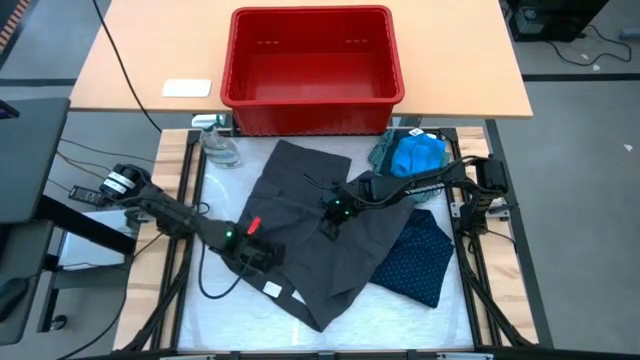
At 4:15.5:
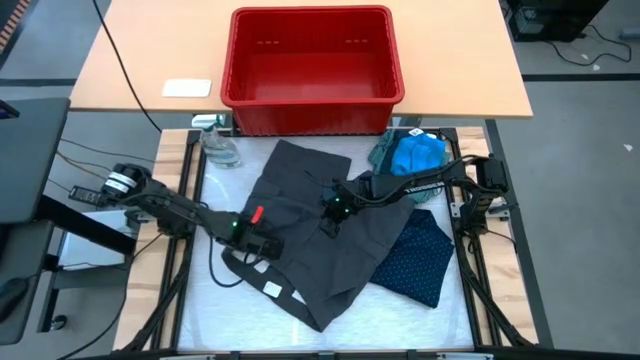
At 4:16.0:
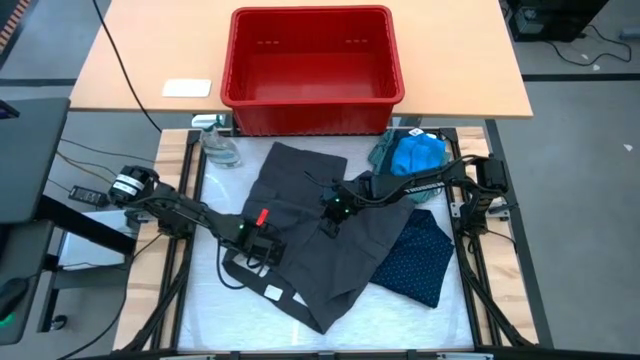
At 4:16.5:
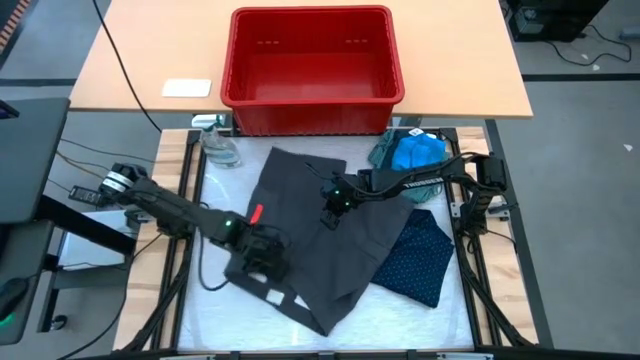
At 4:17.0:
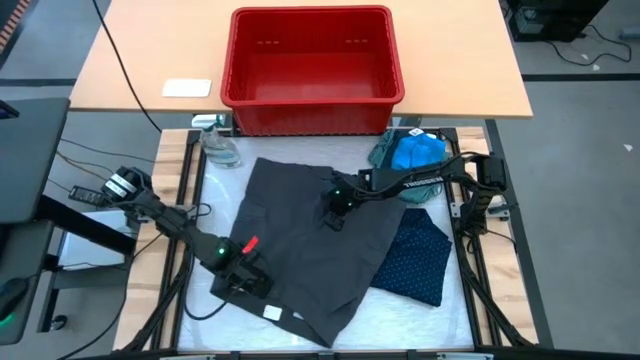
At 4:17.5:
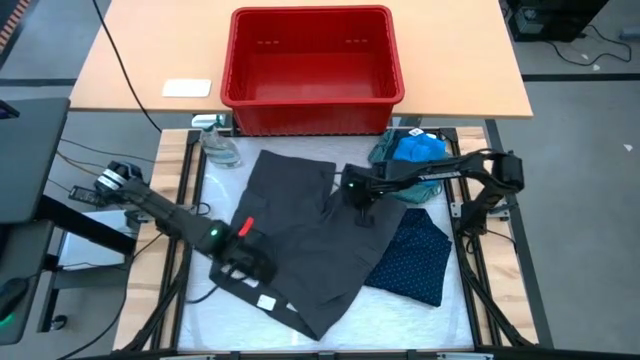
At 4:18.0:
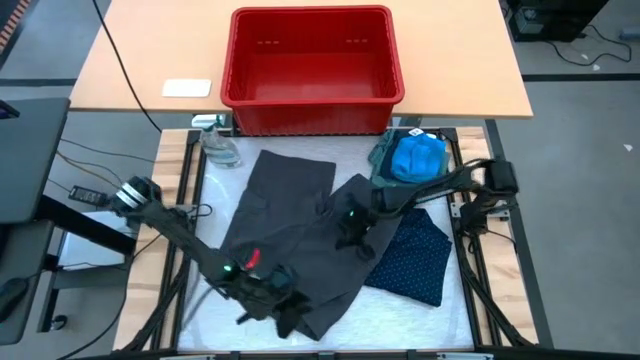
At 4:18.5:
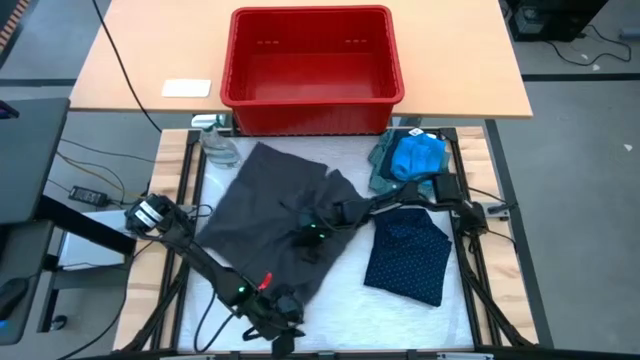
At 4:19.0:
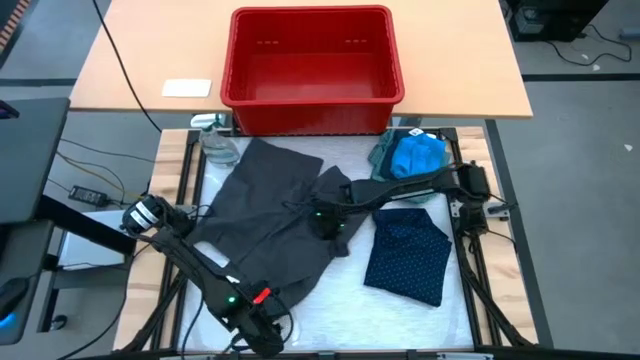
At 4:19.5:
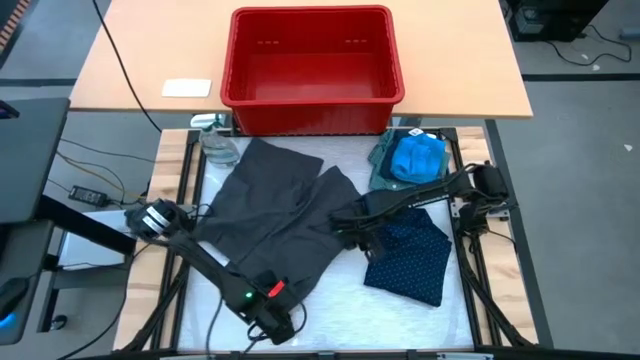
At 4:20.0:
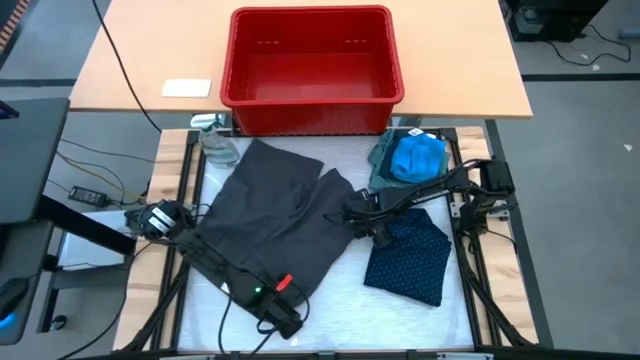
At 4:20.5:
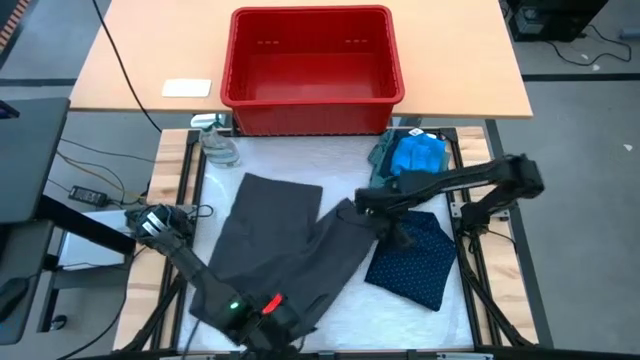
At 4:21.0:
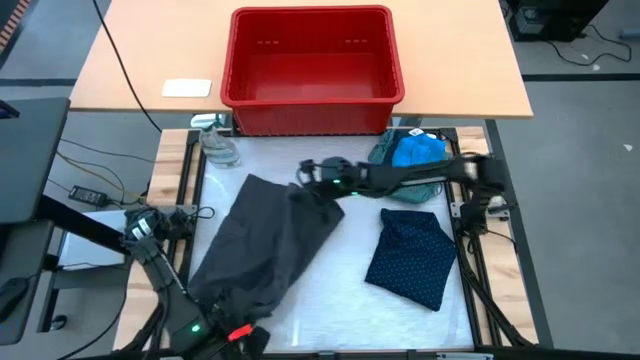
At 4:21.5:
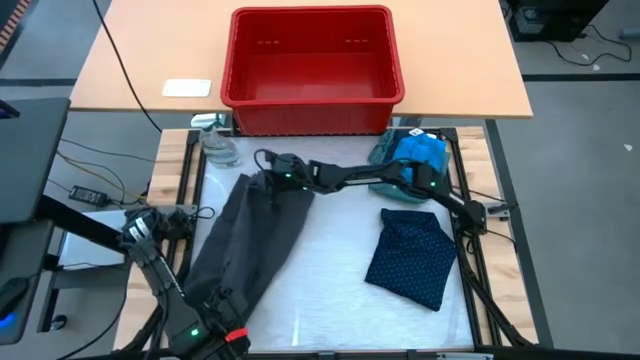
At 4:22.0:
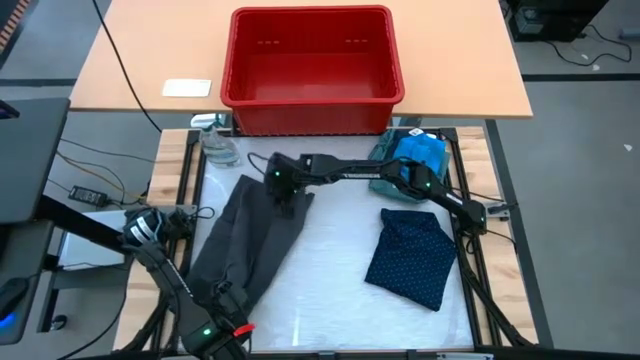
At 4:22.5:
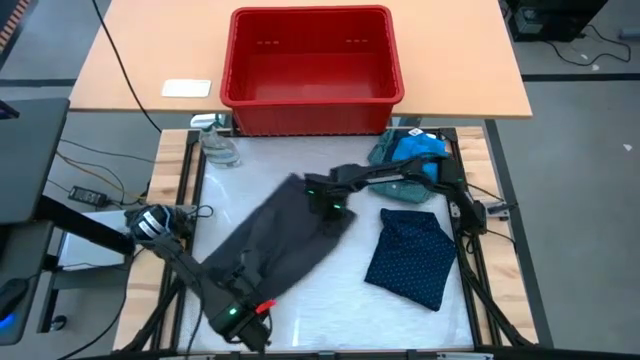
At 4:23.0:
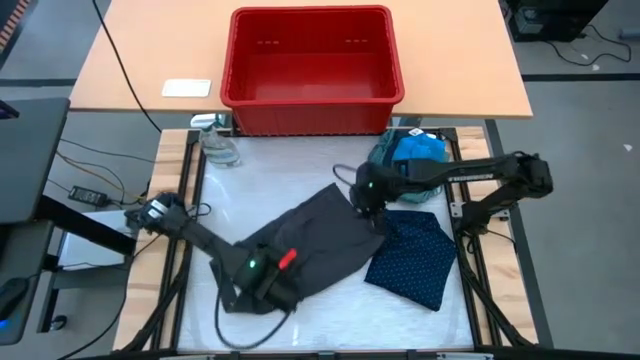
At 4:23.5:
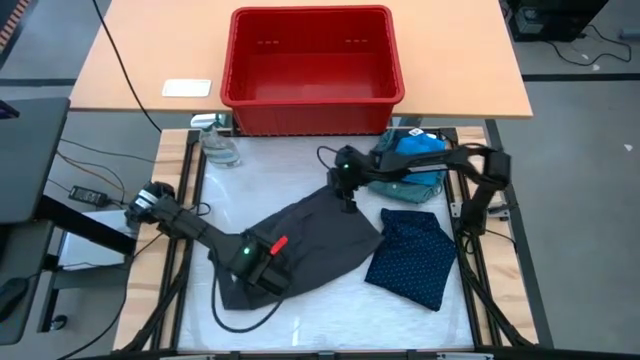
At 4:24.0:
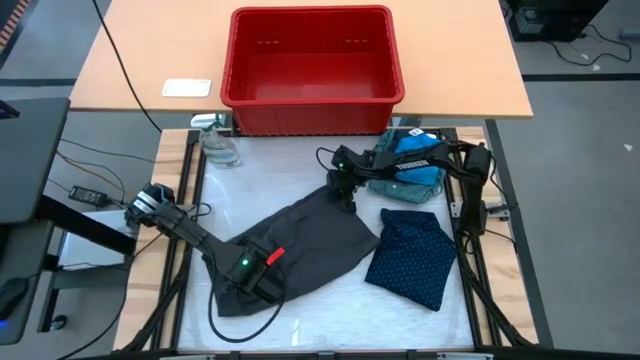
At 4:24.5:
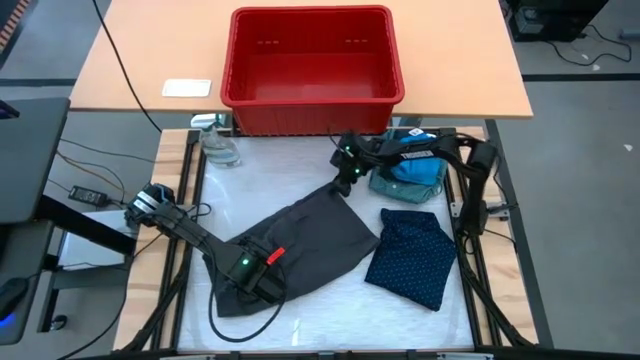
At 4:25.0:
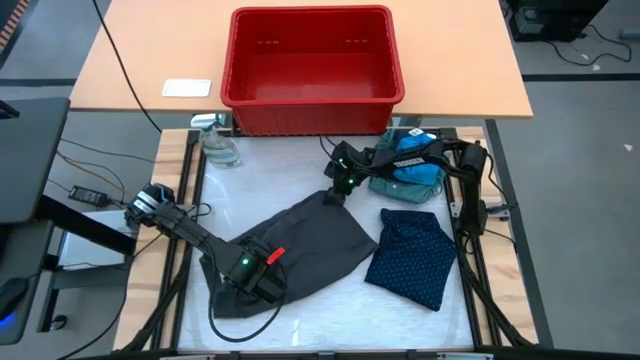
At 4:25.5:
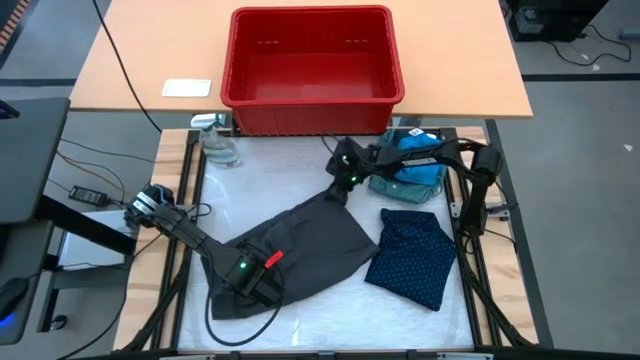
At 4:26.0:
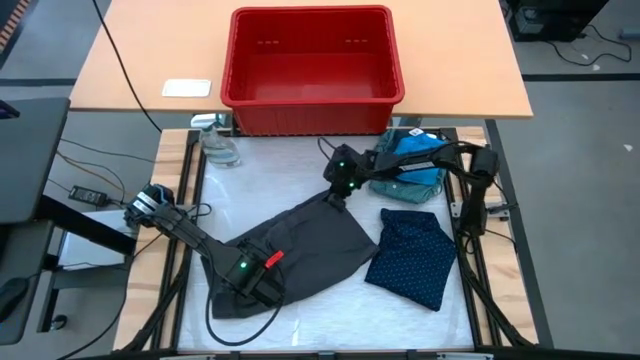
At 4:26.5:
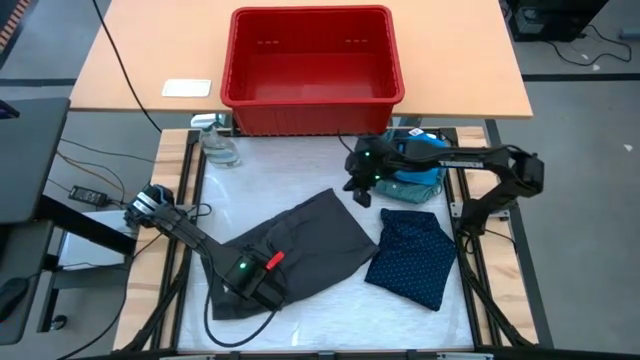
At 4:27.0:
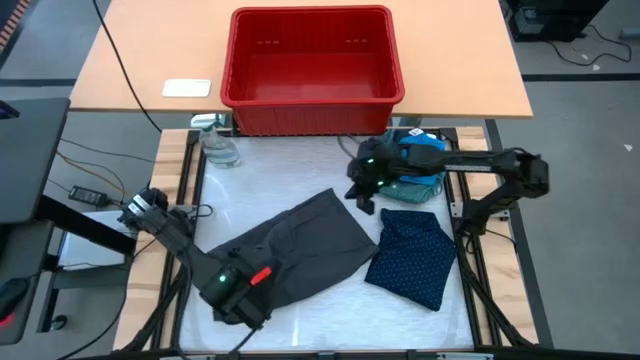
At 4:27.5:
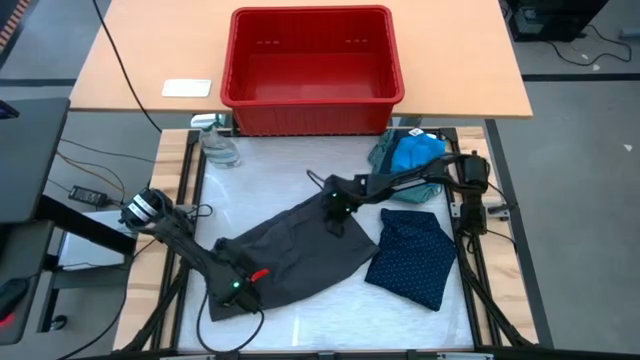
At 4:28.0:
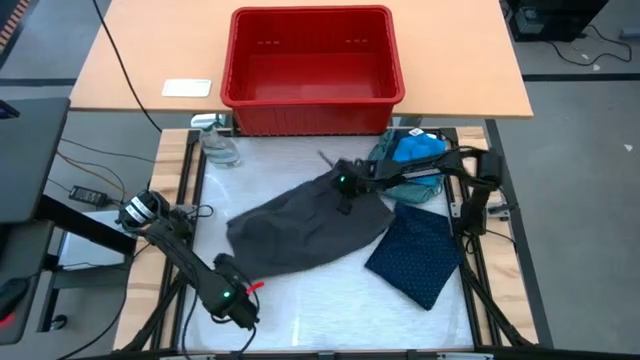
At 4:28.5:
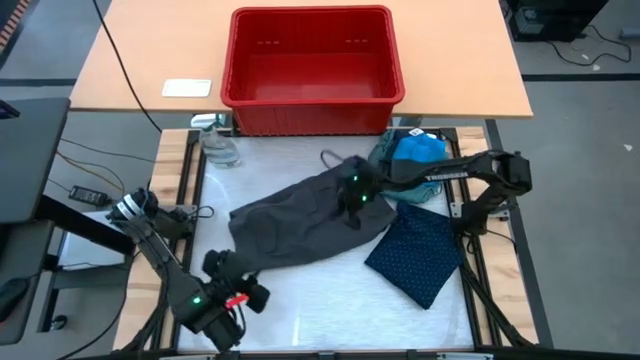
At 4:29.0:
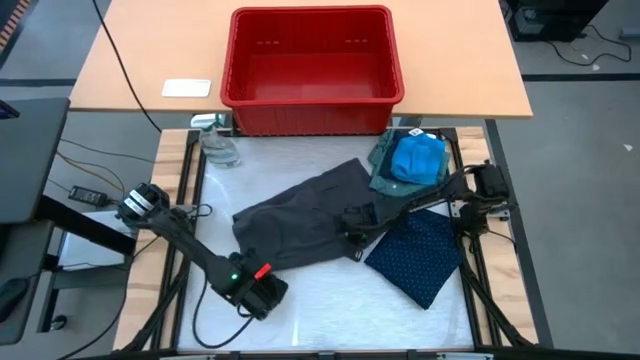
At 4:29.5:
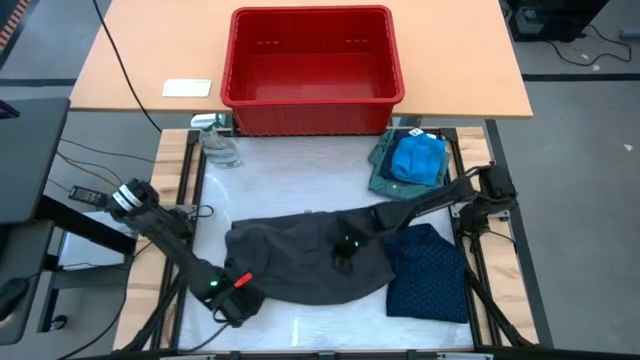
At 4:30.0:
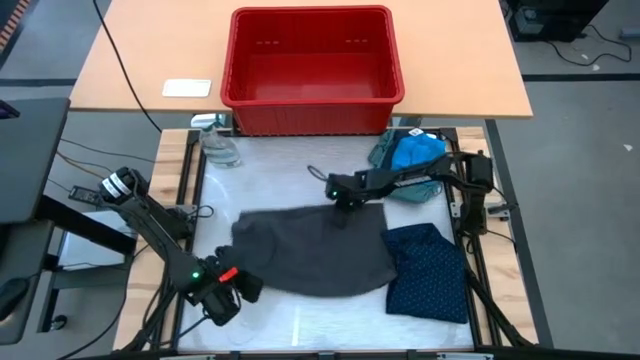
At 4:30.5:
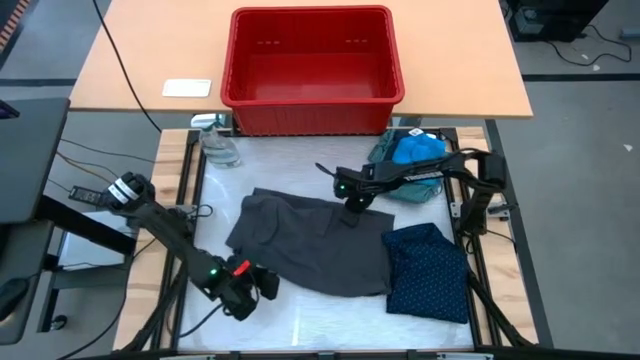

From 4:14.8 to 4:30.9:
Task: Fold laundry
Fold the gray shorts

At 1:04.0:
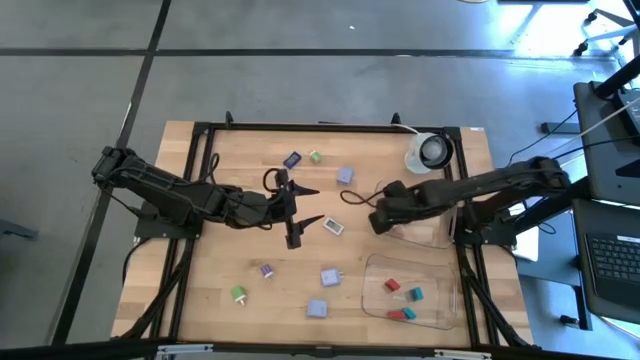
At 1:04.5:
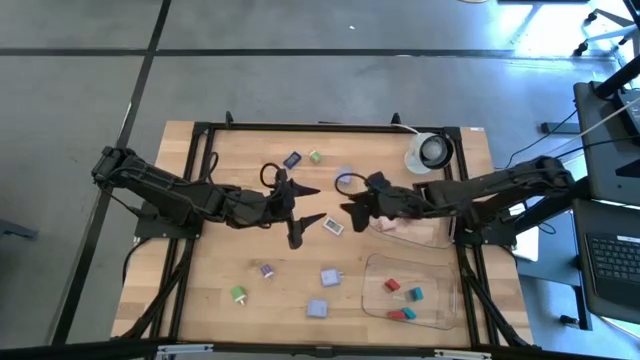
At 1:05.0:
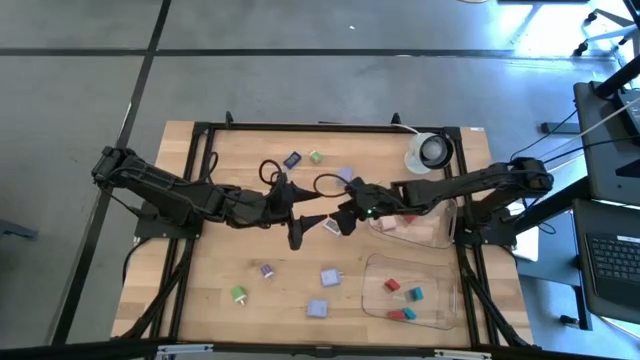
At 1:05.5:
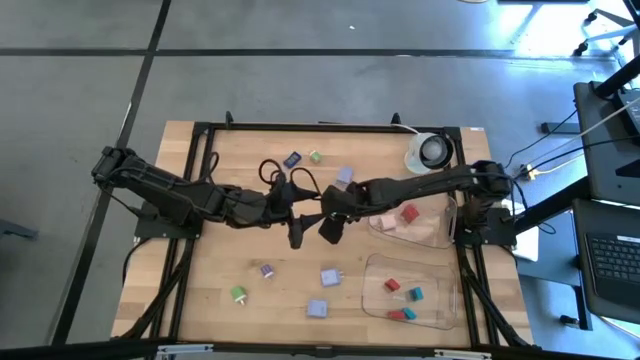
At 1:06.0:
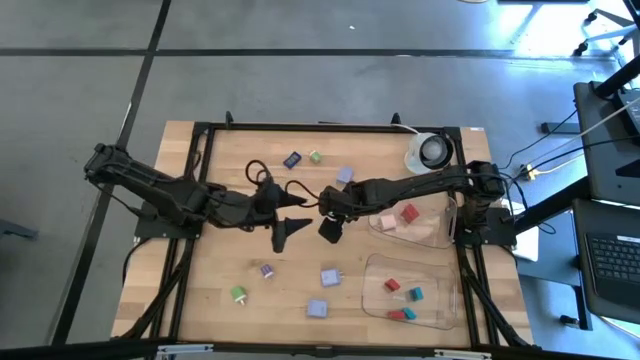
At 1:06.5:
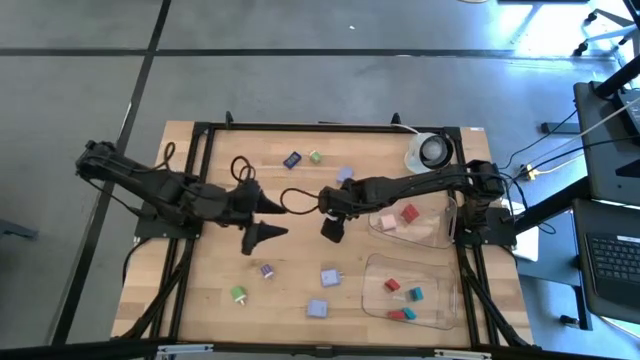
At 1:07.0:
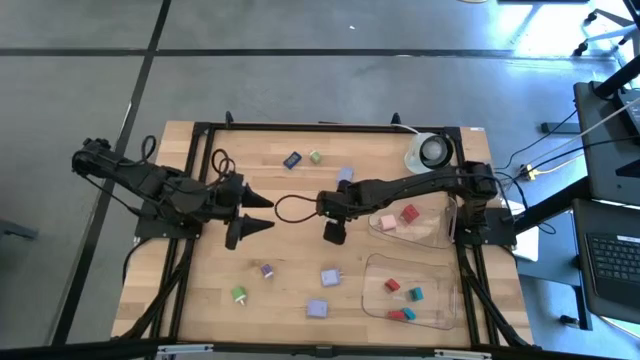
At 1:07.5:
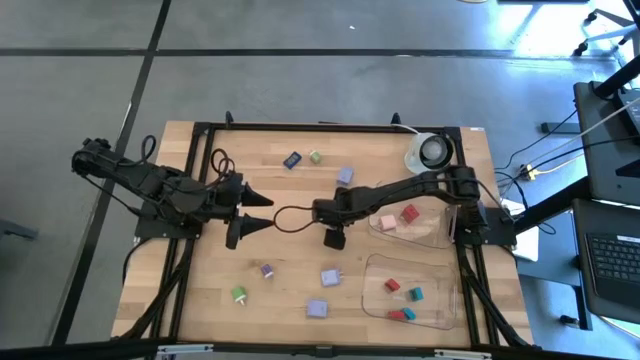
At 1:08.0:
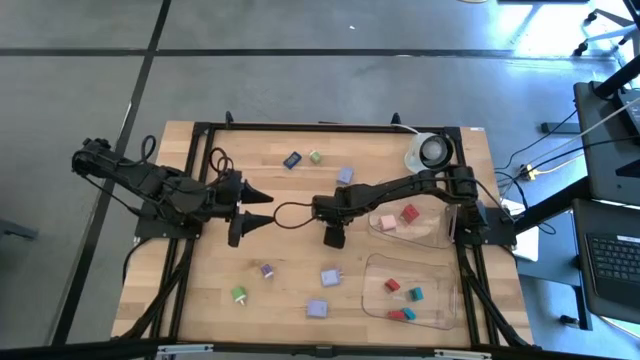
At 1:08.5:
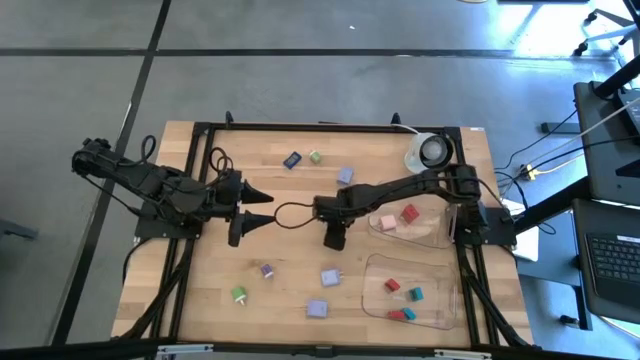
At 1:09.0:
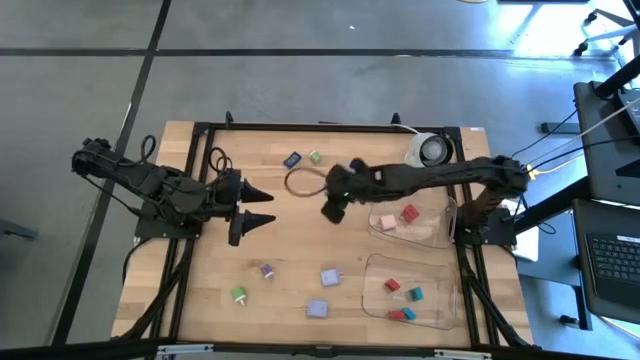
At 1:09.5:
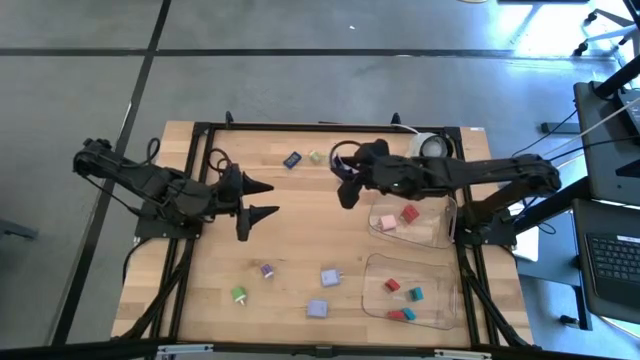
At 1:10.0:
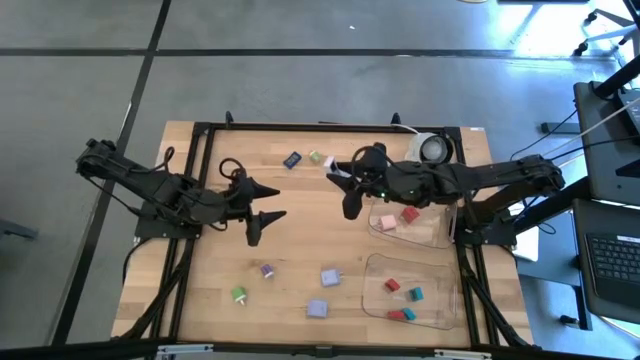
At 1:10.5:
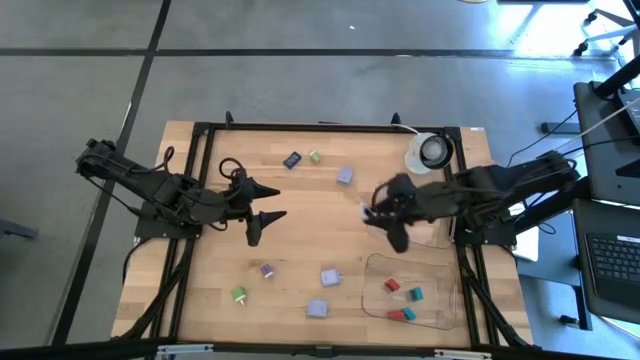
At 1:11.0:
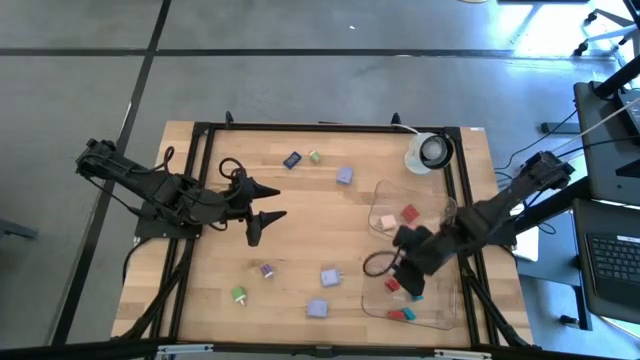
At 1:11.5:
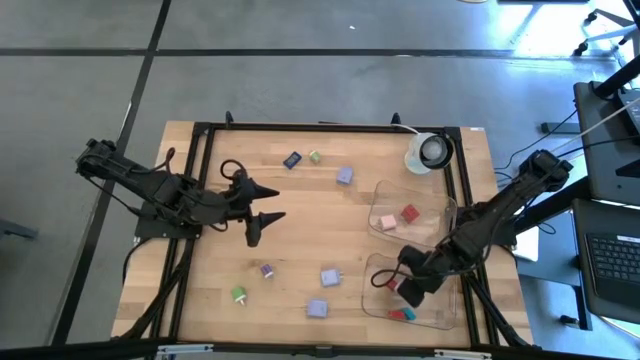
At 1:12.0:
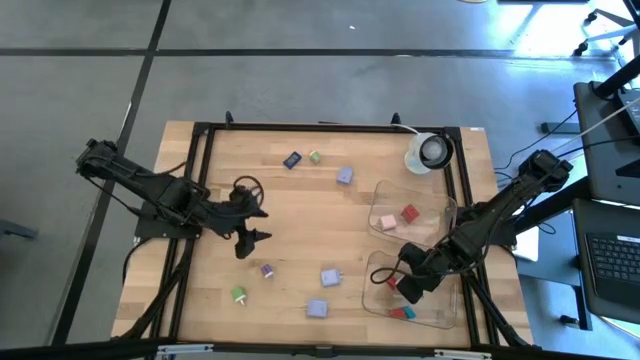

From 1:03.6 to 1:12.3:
Task: Pick & Place Office items
Put the white digital timer into the bottom transparent bin
